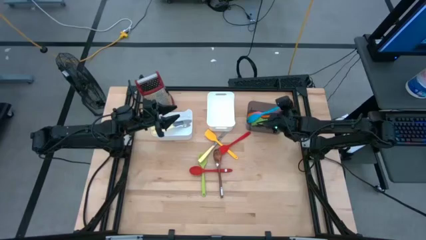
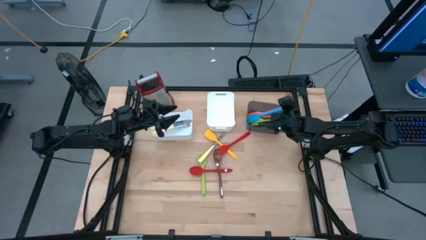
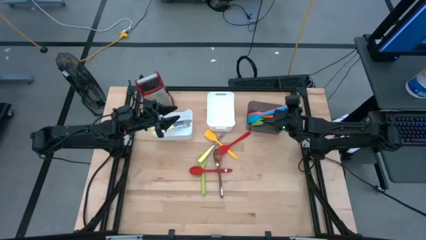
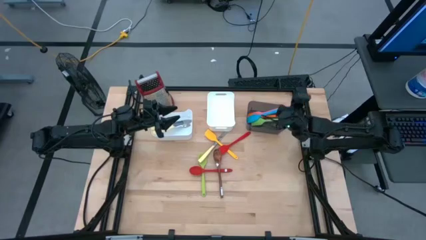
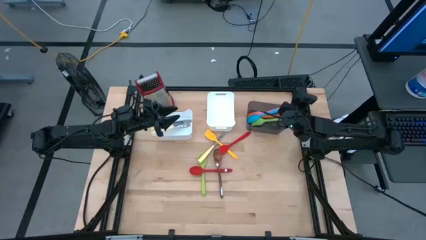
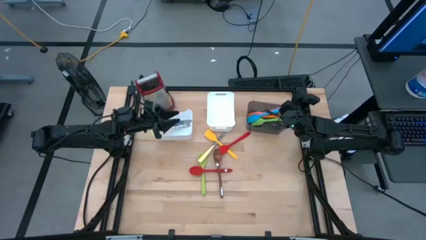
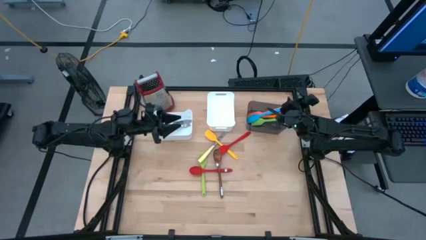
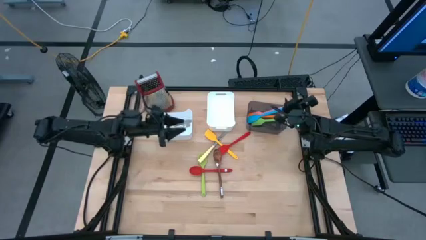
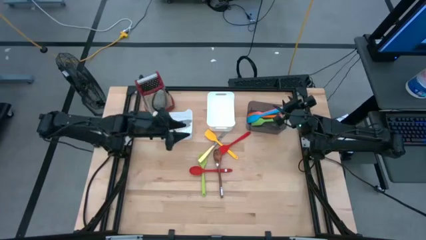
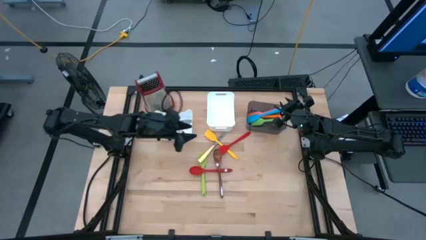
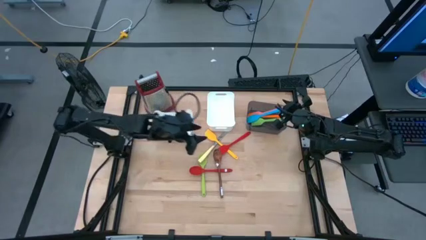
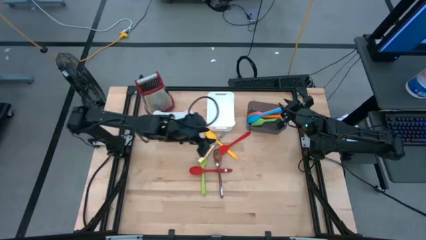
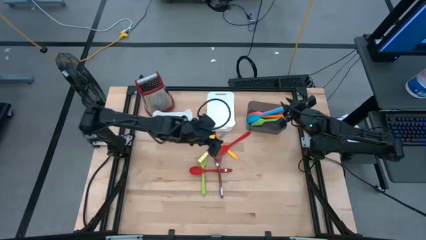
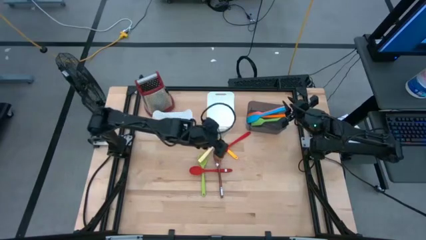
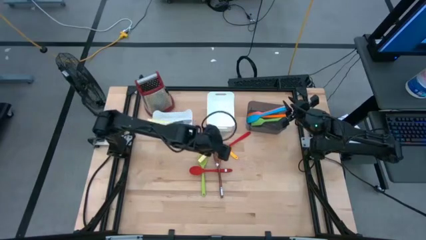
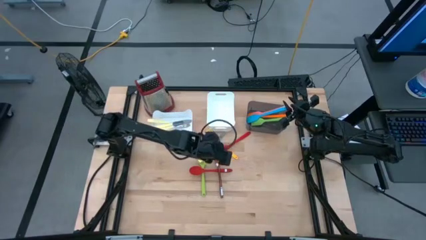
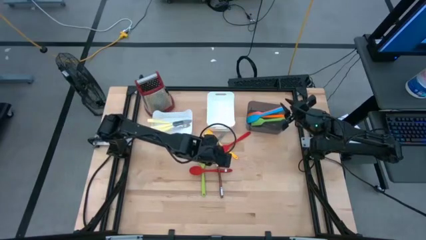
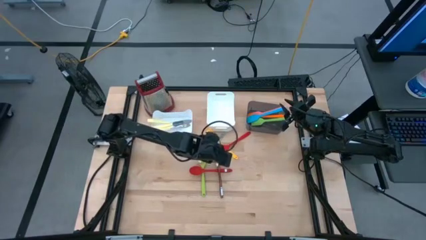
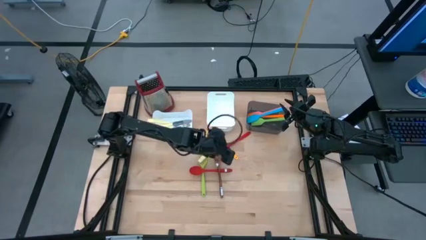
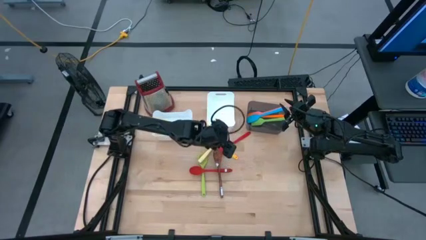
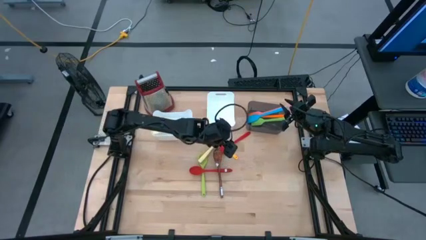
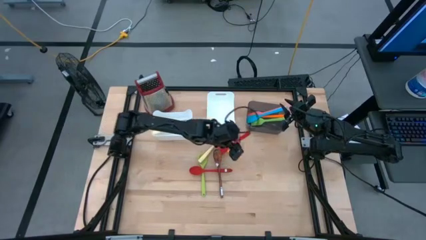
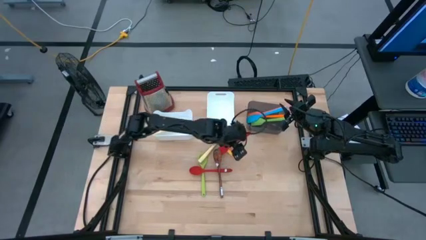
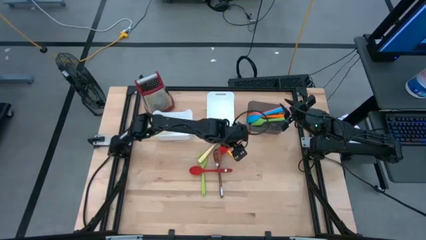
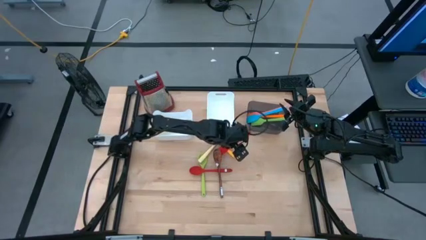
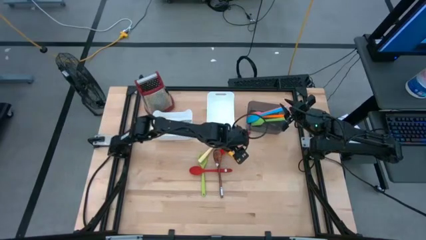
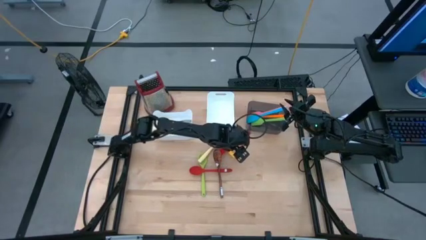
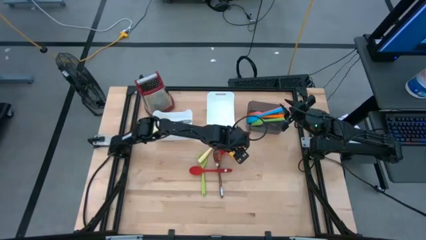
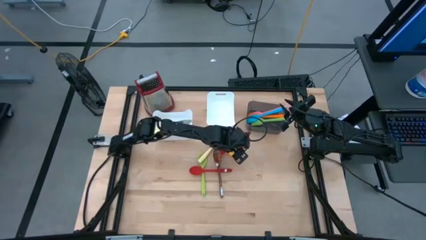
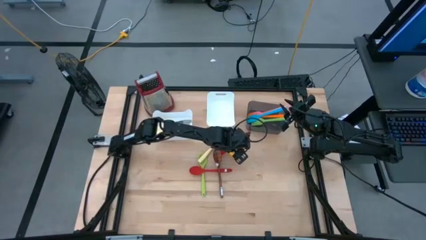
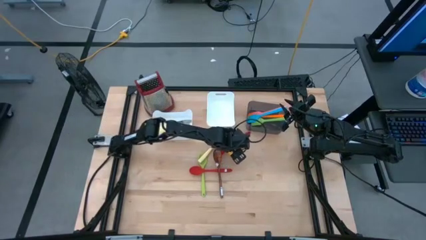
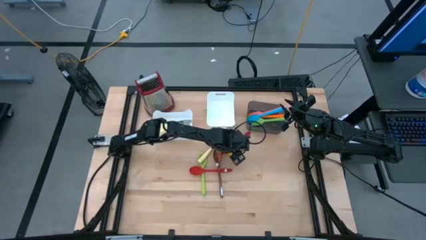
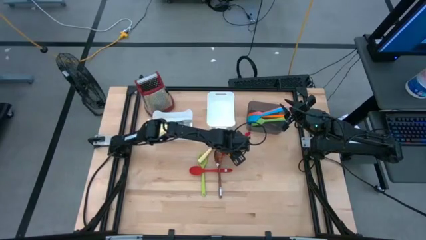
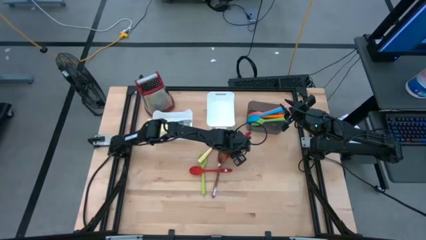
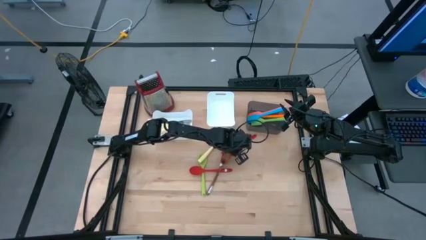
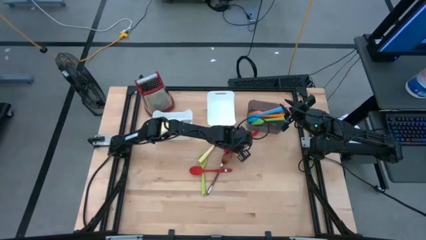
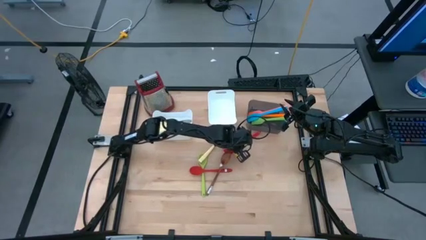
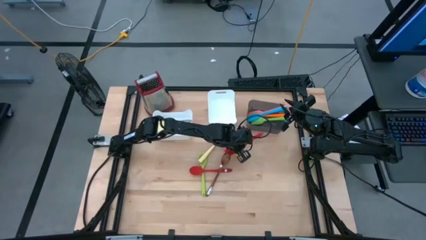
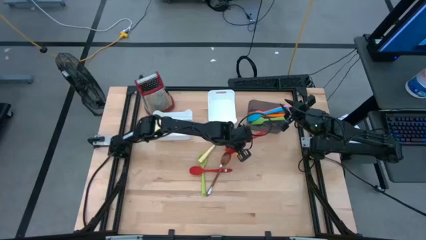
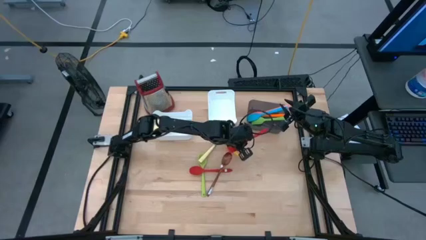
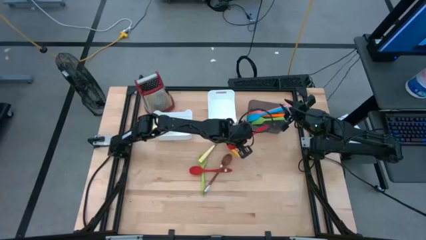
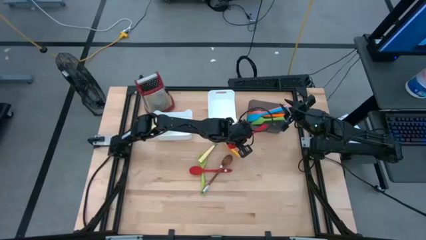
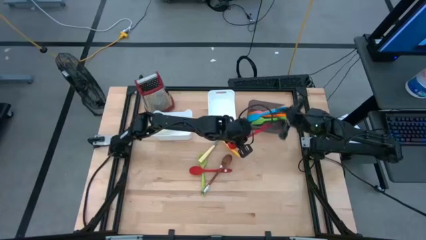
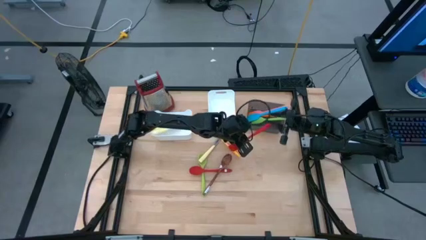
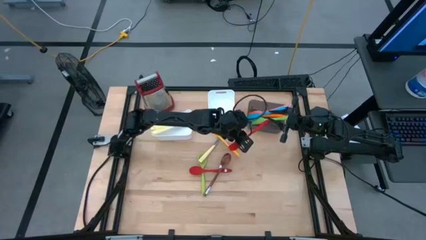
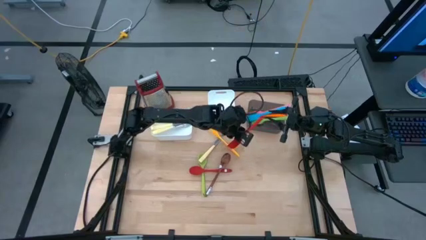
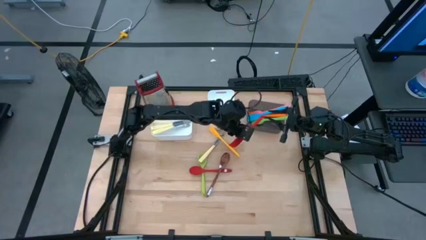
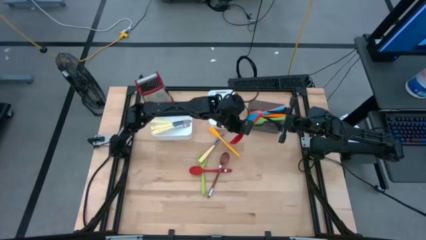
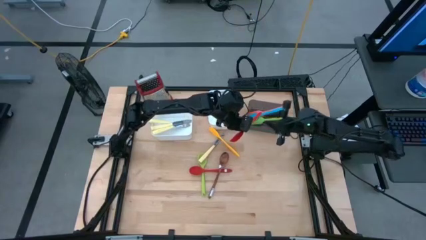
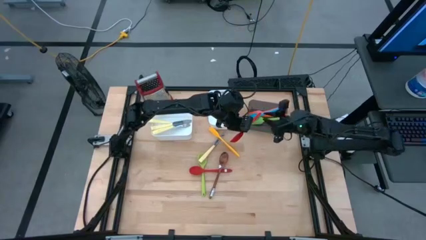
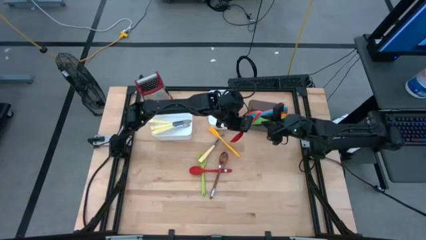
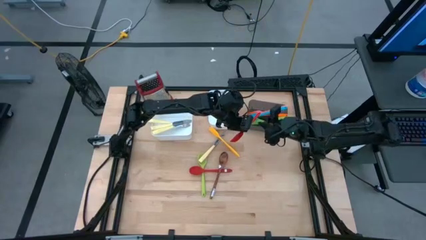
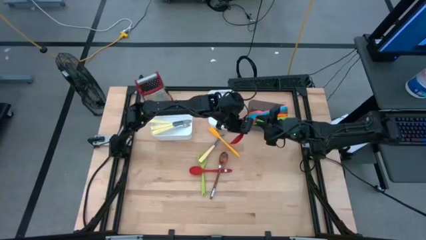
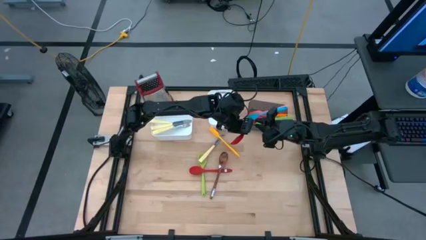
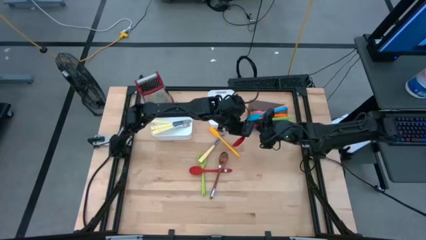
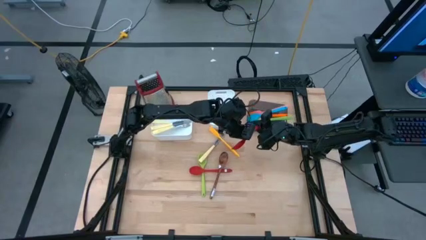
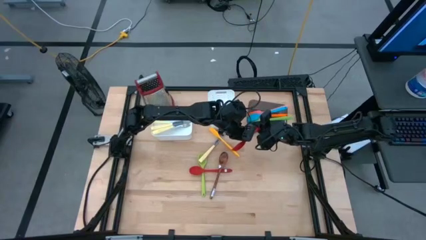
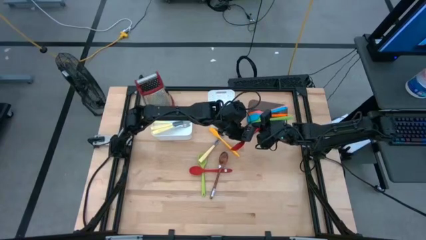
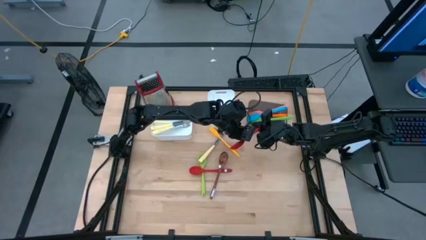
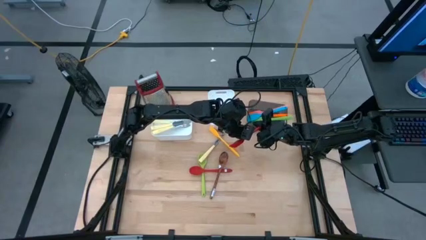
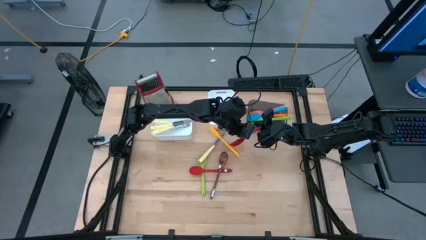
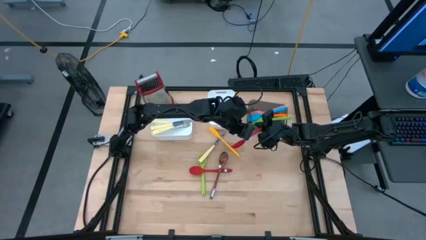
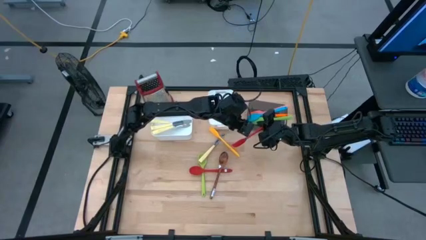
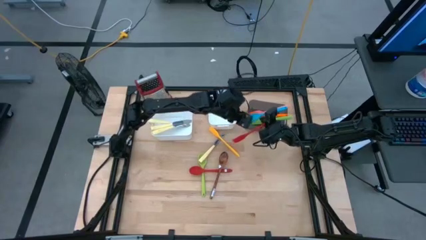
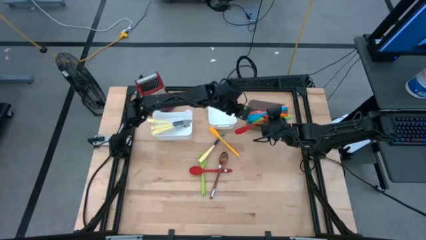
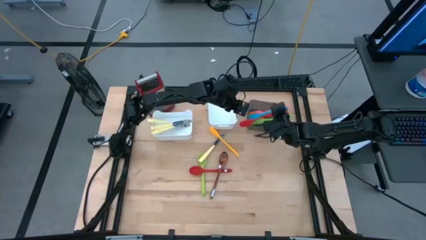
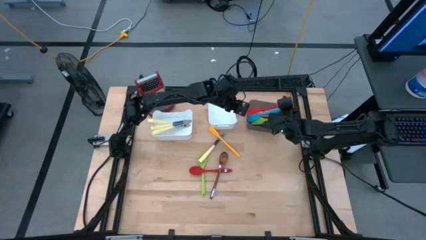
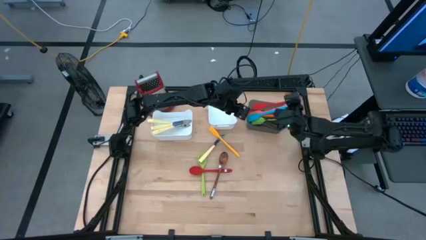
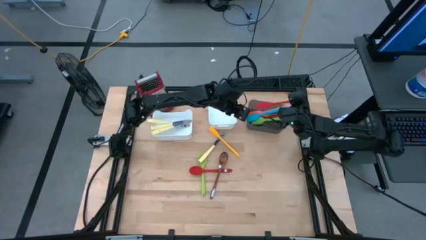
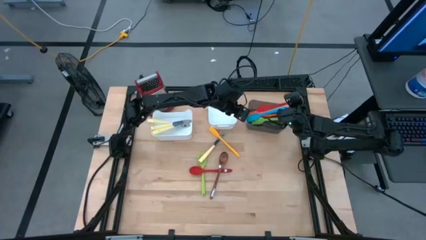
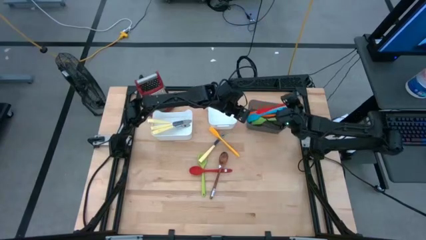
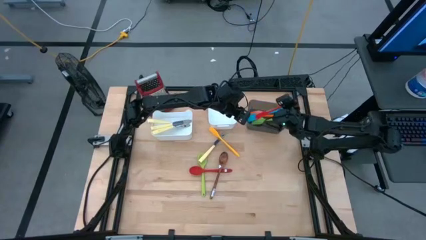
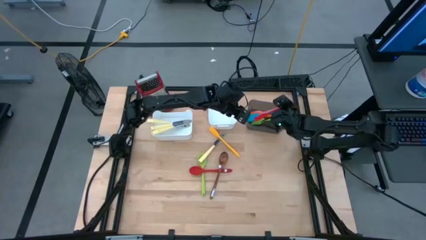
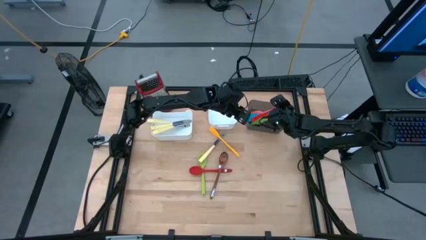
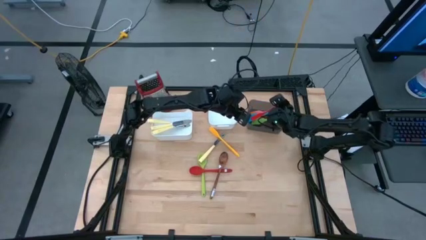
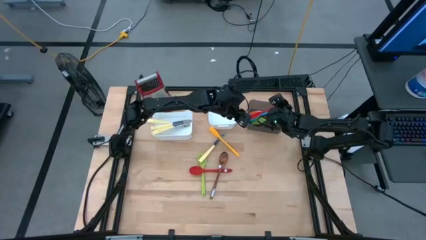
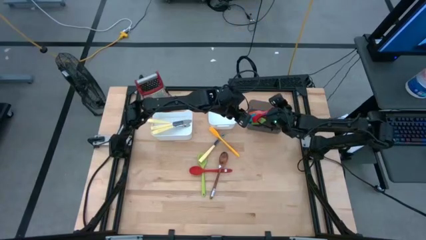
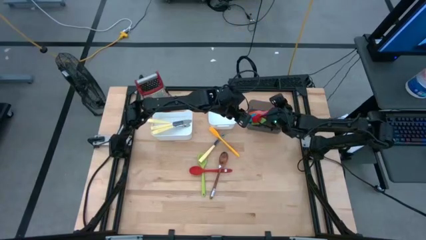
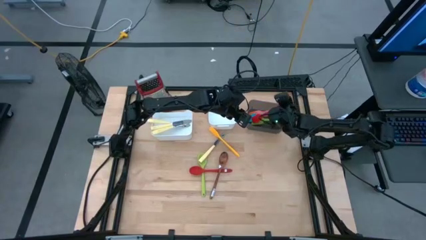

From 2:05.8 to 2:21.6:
Task: Pick & Place Kitchen Items
Put the red spatula into the black bin
